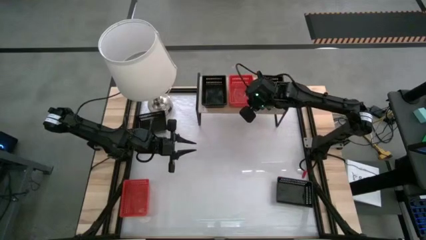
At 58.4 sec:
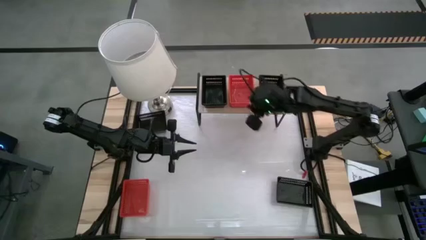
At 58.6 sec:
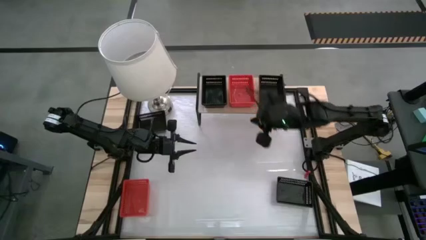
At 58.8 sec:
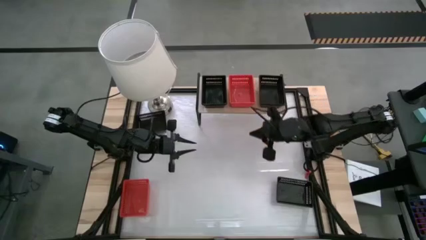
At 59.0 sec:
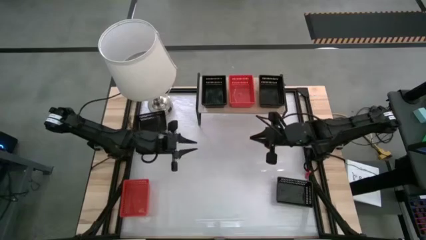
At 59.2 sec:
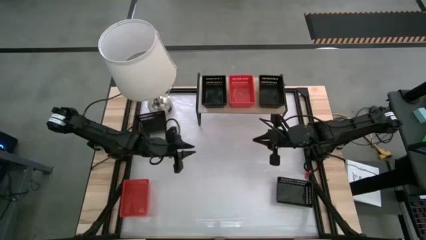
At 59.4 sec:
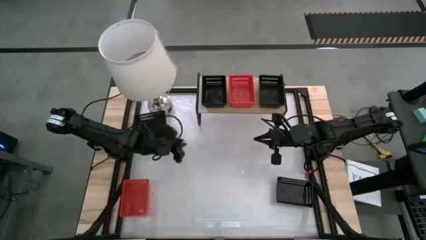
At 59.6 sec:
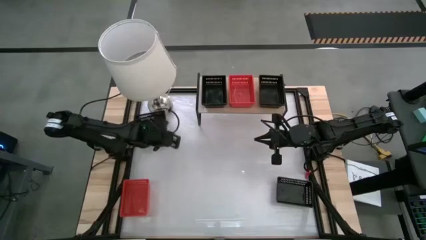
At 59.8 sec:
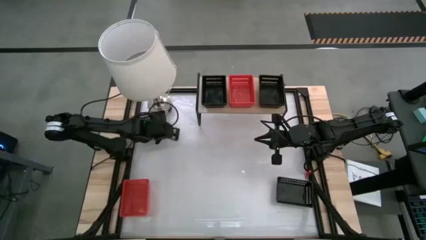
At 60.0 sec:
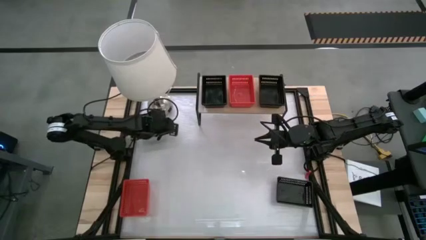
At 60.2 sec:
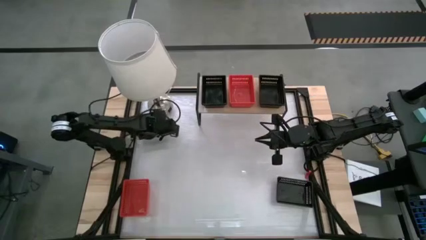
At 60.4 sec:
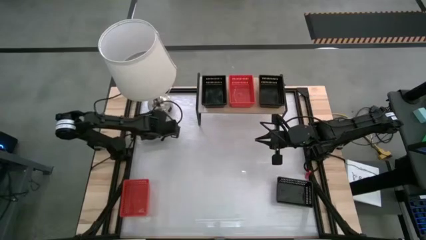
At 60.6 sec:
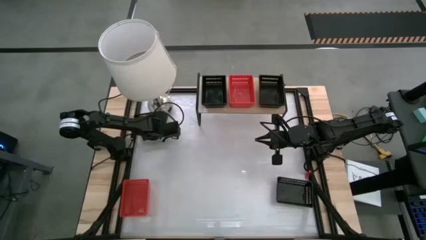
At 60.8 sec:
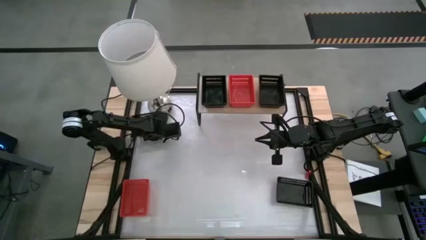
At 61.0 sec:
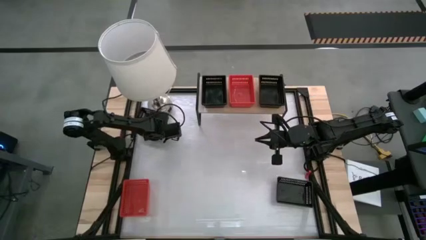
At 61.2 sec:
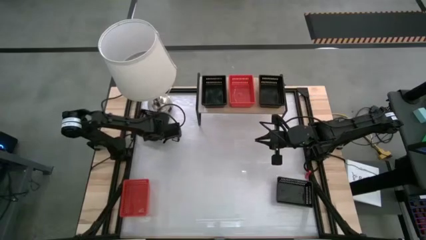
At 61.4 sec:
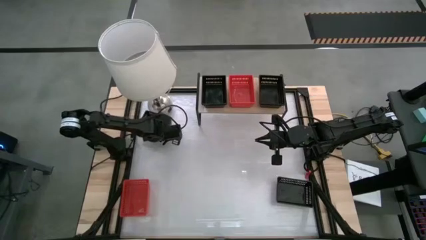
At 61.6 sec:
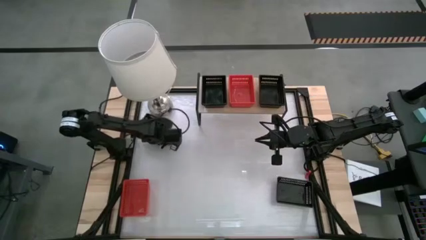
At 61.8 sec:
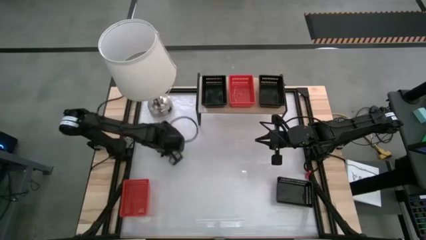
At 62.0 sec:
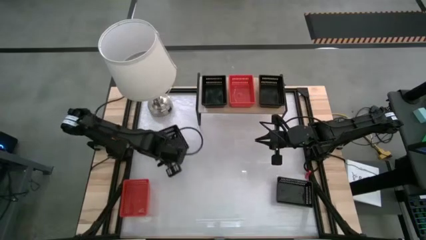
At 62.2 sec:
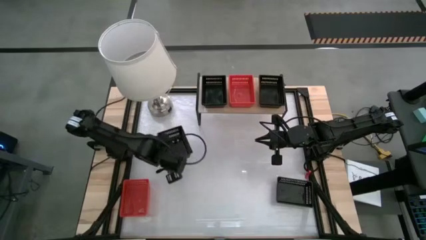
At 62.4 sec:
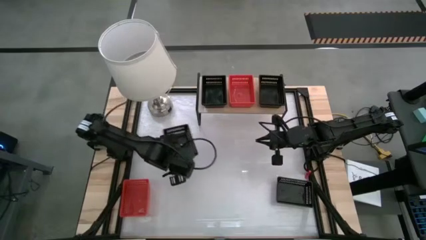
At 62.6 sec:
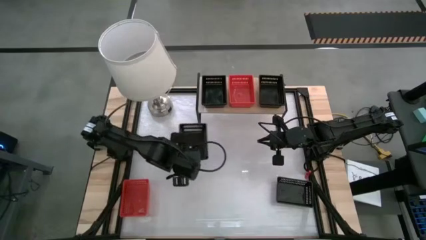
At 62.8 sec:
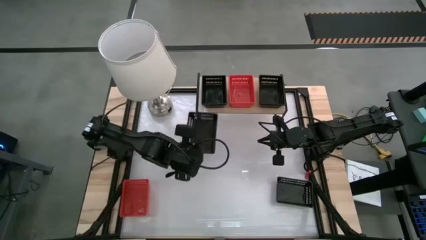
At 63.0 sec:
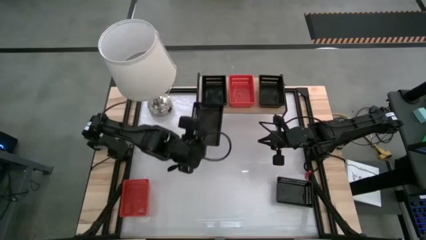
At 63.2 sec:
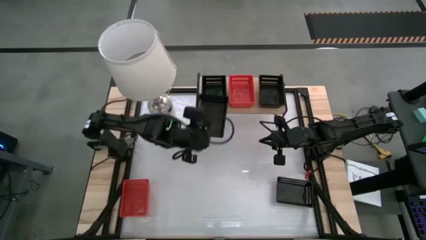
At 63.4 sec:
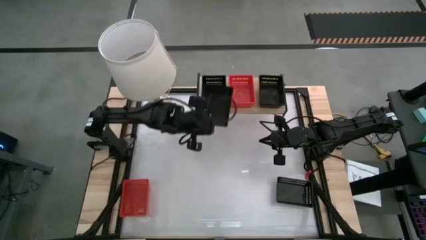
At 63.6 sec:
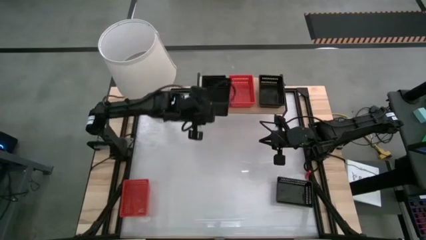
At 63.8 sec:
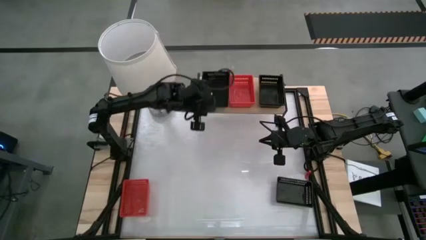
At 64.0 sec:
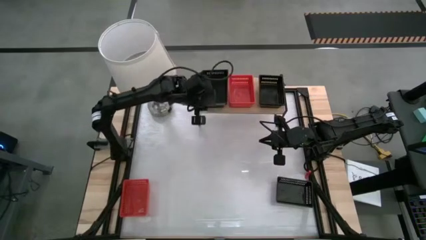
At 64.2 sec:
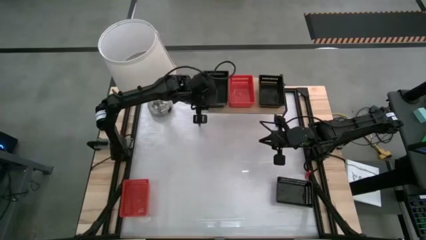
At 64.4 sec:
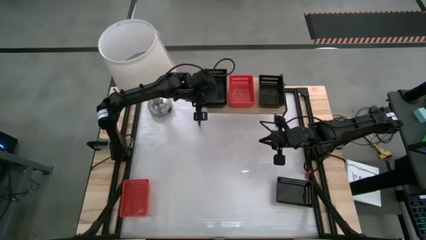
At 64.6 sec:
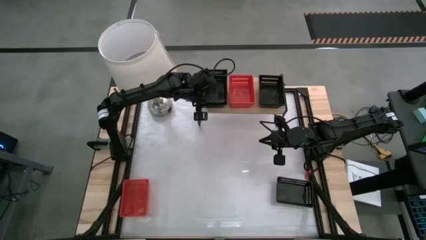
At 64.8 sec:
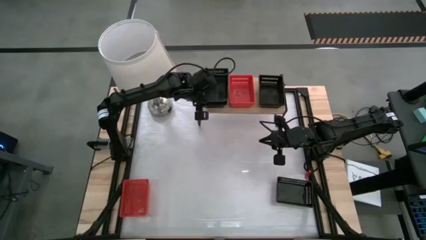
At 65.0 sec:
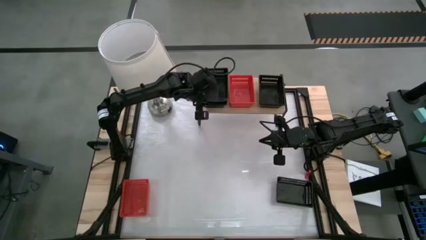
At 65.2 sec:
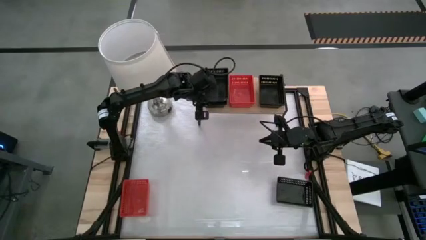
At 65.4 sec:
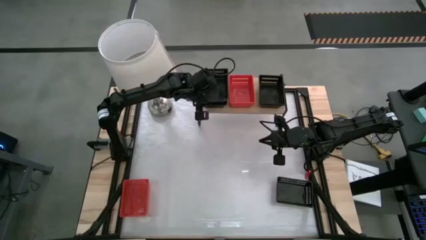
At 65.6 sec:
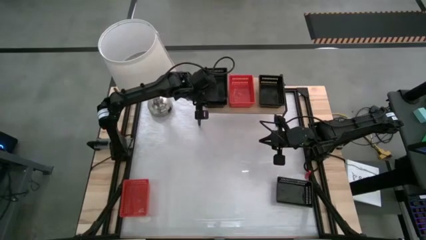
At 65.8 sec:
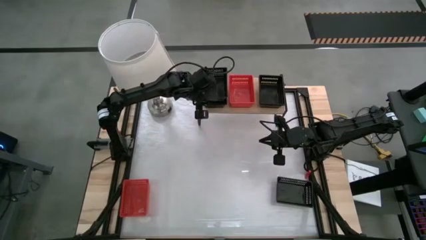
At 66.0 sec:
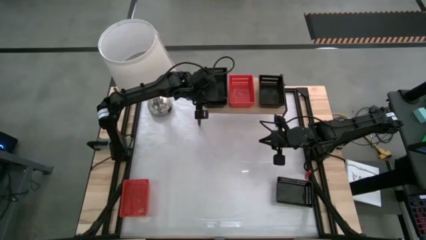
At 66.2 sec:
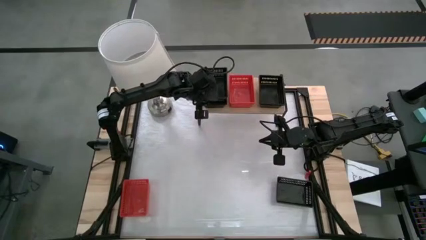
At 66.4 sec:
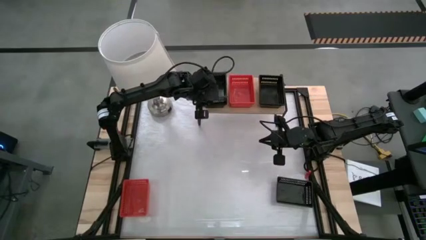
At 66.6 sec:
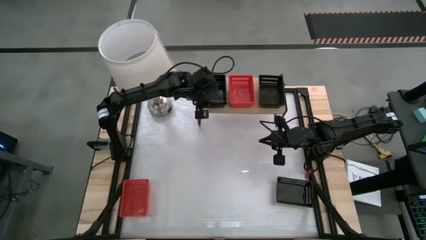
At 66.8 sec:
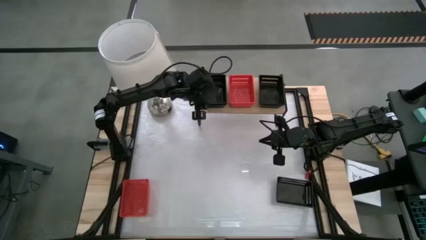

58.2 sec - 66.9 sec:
Task: Stack baskets on shelf by color
Stack the black bin on top of the other black bin on the shelf

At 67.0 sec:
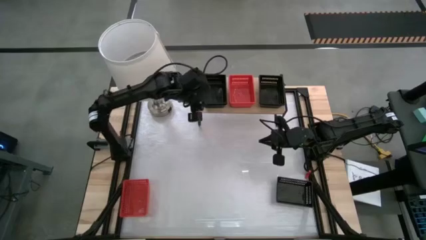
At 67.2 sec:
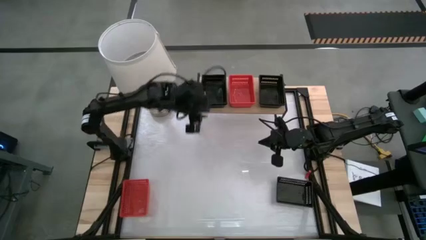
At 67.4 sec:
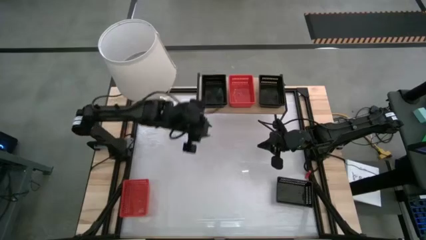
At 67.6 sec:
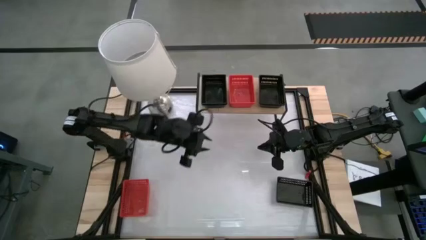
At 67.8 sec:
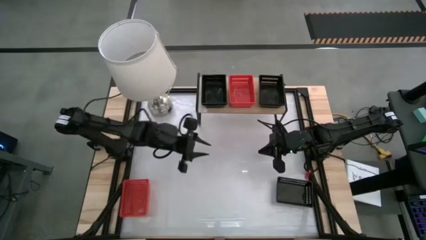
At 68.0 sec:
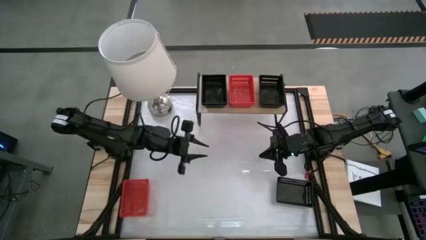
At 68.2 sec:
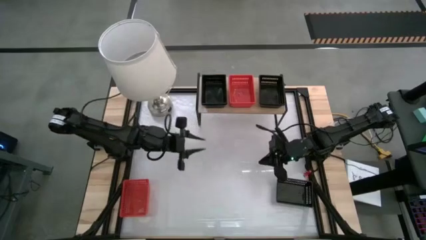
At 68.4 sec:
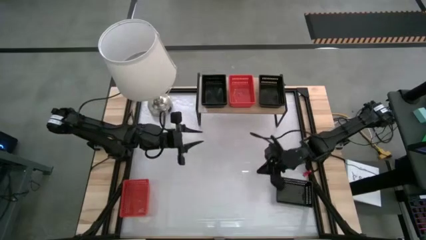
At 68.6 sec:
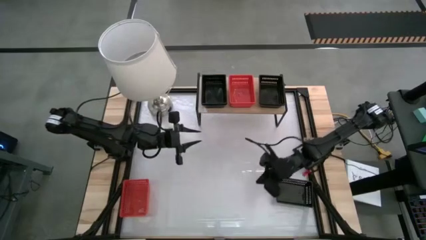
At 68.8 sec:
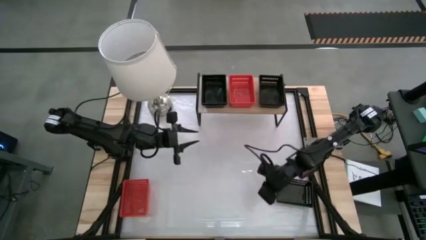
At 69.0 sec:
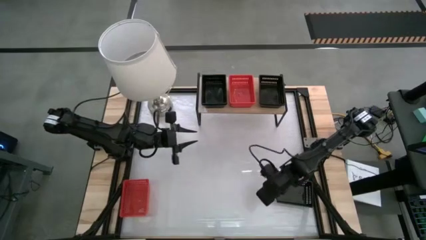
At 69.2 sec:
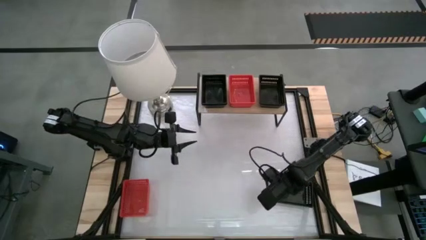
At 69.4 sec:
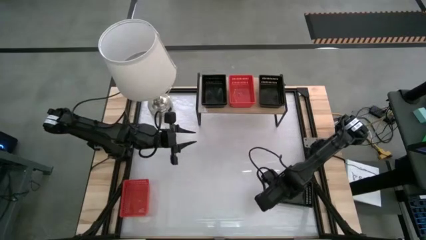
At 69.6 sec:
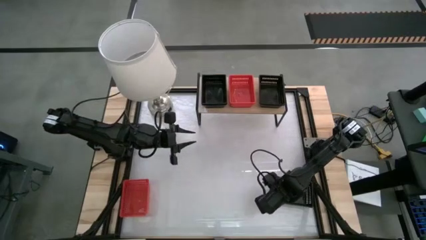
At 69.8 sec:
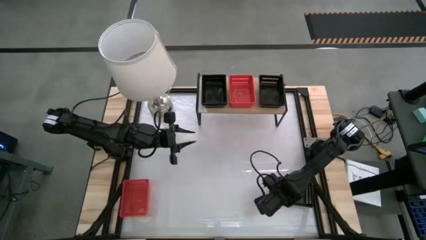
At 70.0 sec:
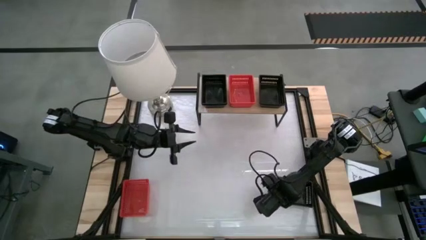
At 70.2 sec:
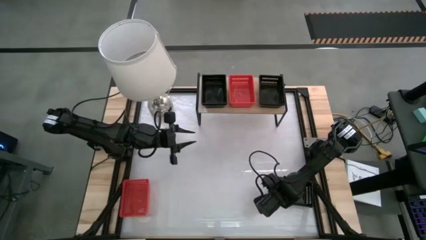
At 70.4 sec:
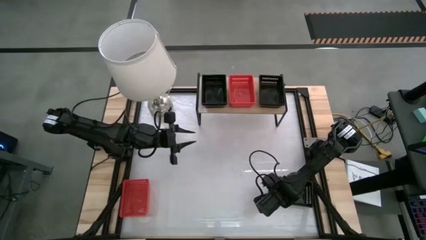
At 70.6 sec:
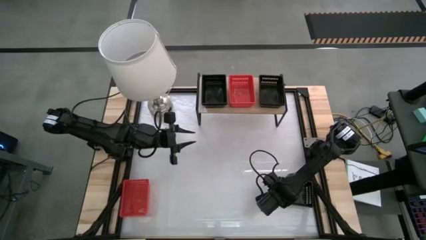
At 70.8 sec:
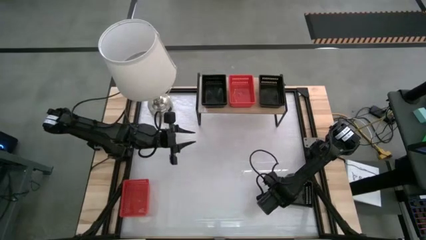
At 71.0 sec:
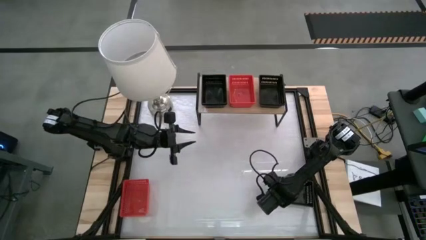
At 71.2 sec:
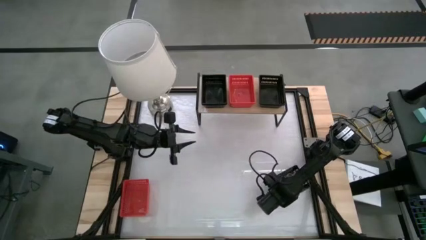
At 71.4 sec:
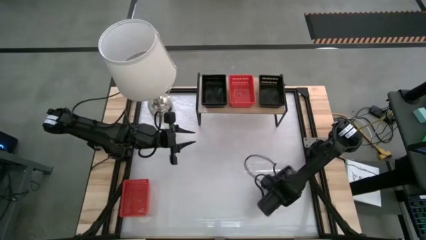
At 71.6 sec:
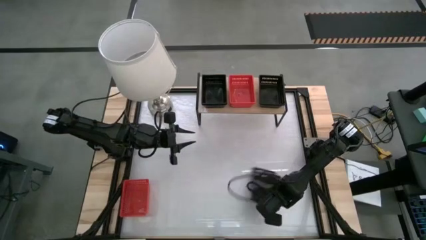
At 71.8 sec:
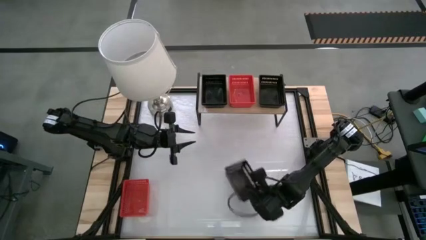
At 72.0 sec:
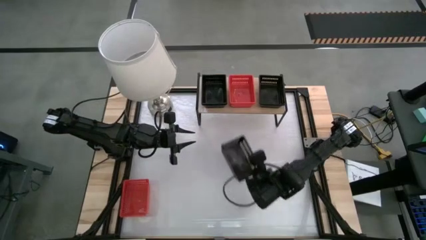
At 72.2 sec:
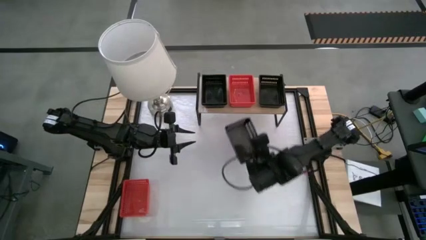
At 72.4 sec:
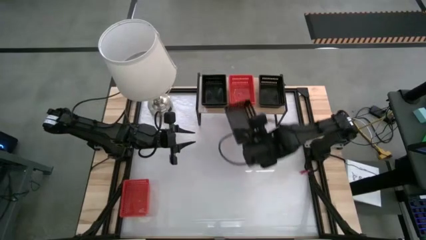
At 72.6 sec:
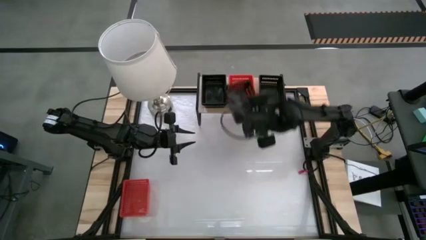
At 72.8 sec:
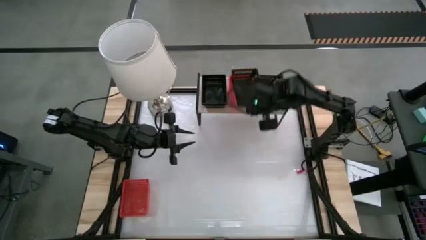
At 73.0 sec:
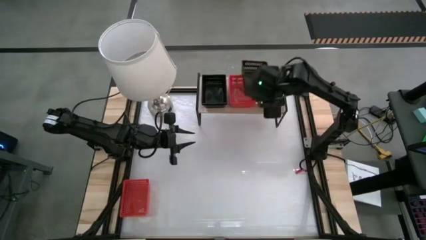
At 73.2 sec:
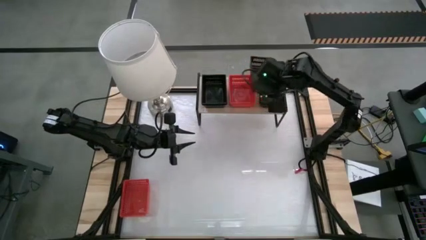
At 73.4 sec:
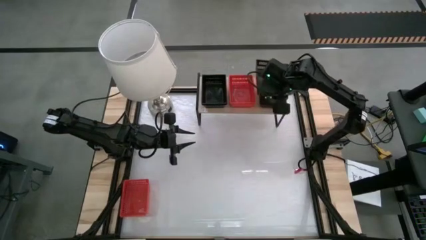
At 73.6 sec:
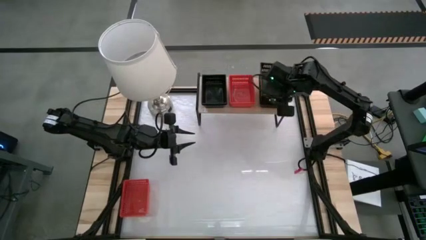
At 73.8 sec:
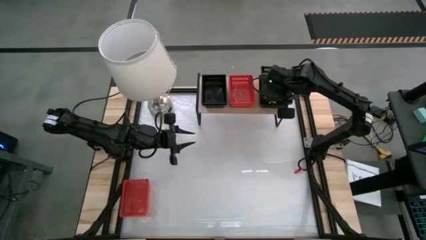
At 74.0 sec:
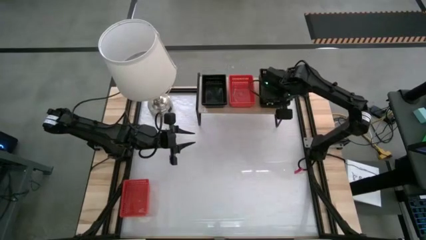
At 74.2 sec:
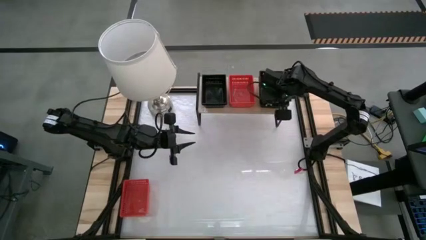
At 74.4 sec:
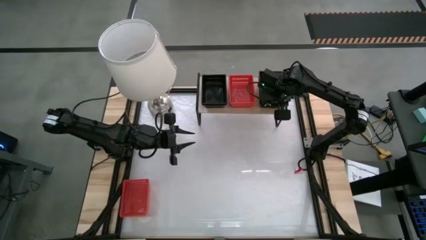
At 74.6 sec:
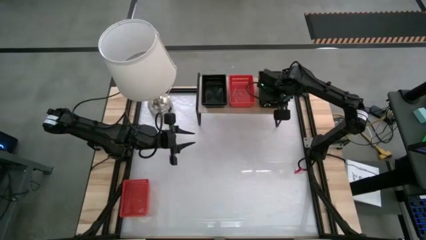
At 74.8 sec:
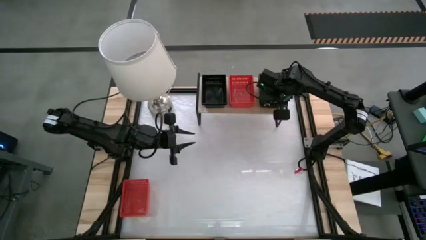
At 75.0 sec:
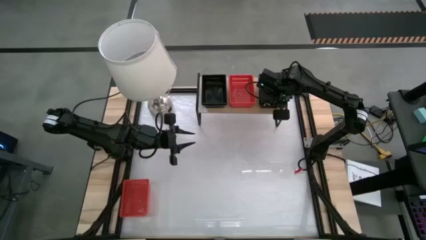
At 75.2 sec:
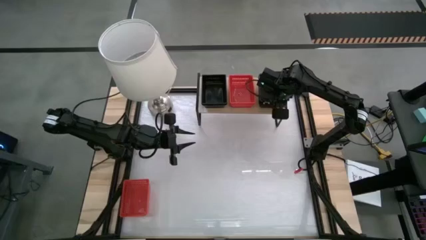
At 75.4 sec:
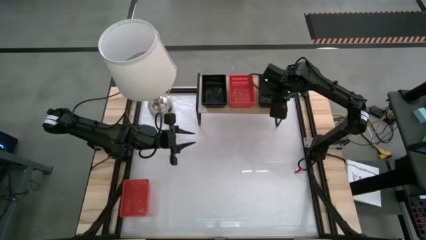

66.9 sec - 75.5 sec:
Stack the black bin on top of the other black bin on the shelf
